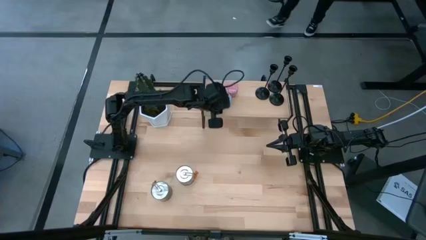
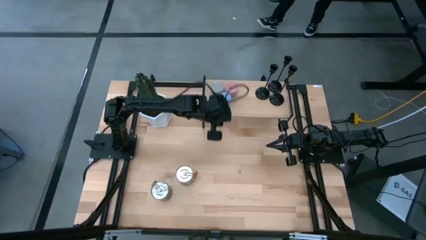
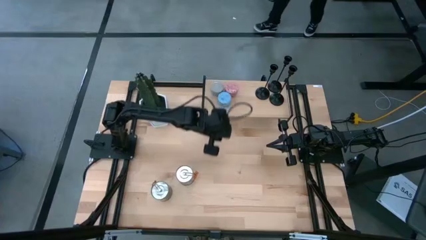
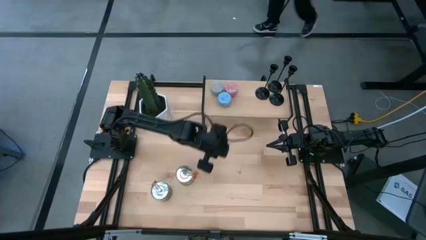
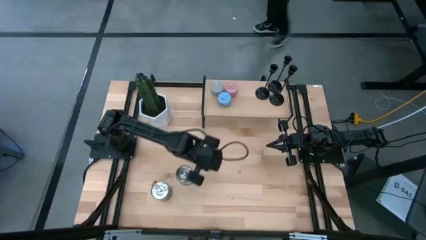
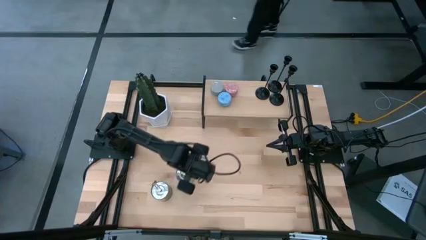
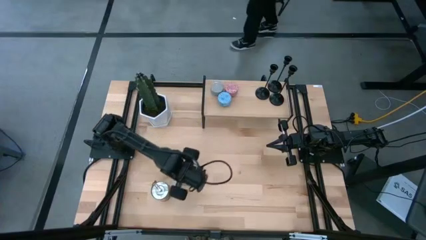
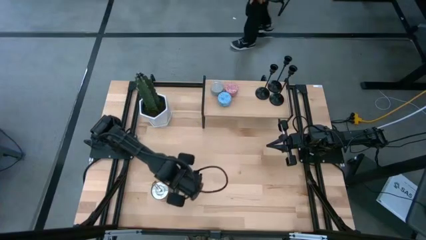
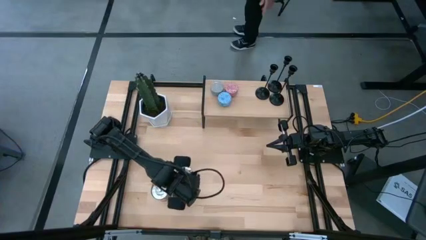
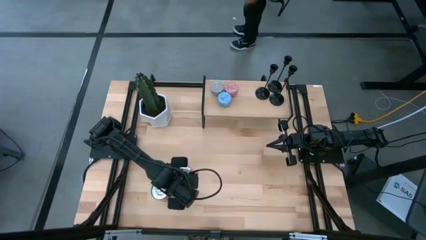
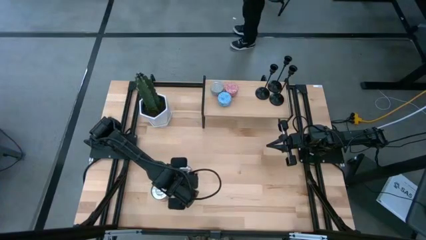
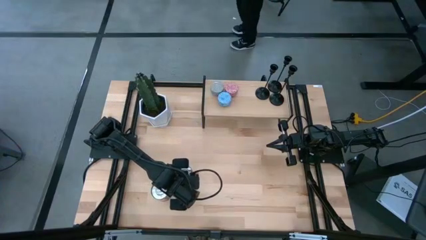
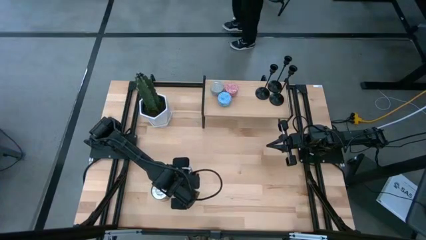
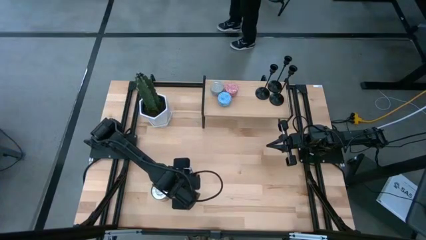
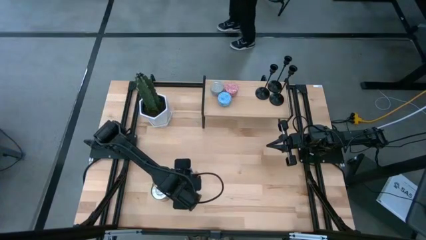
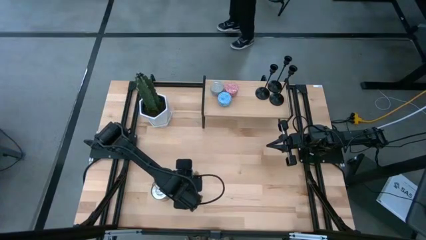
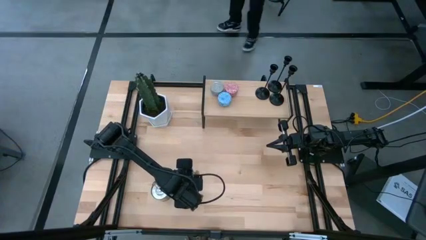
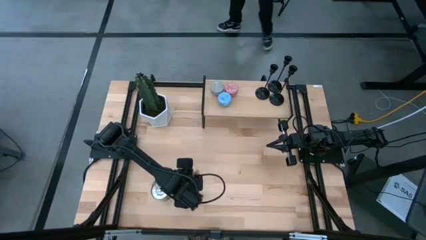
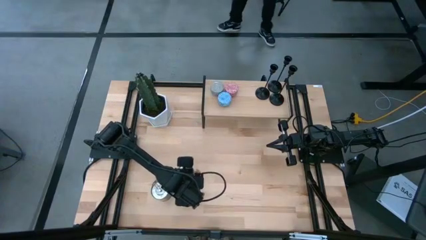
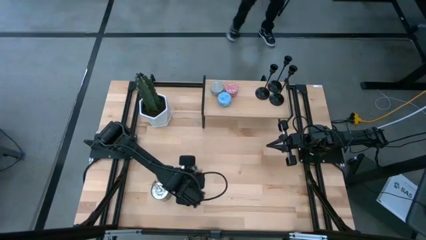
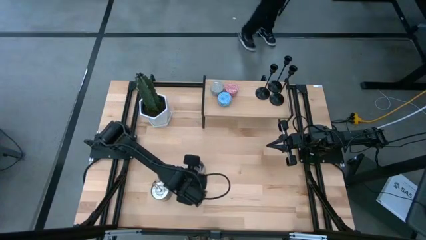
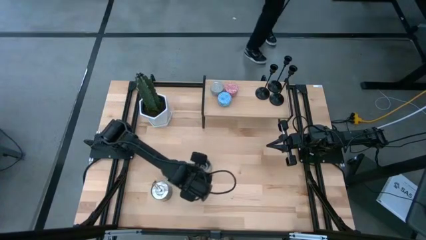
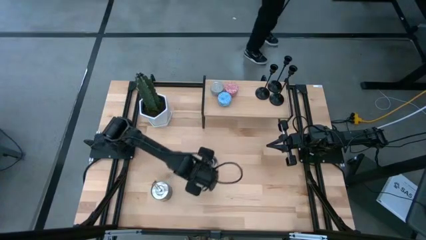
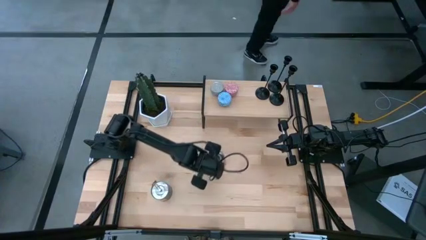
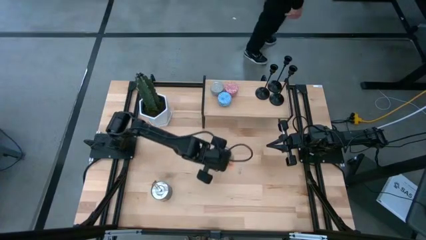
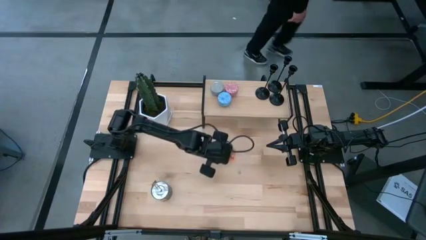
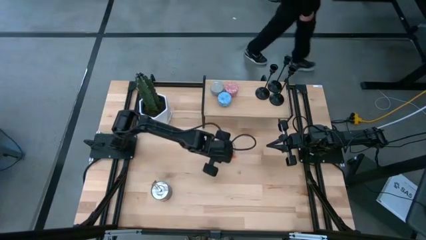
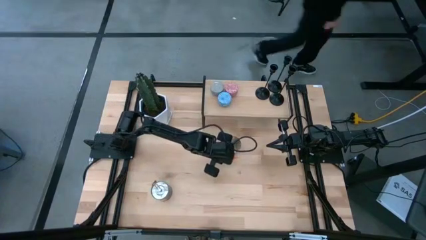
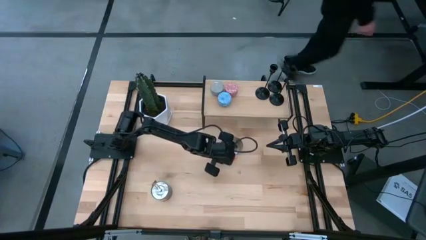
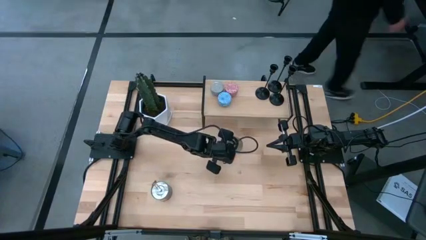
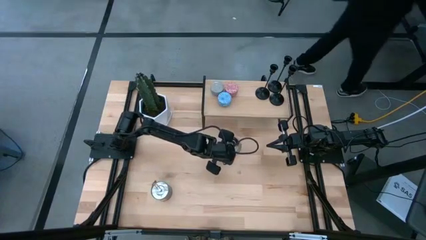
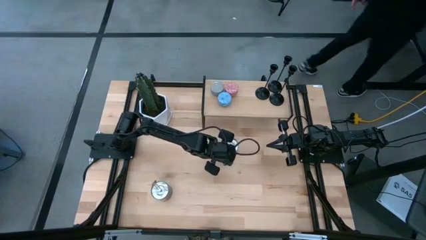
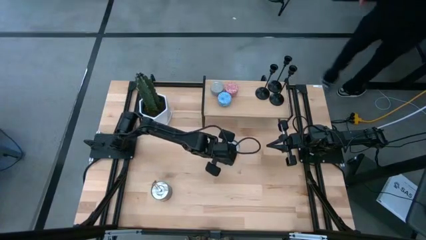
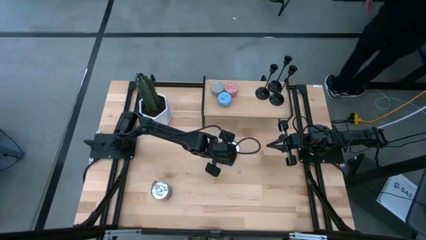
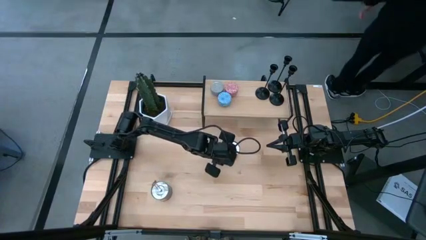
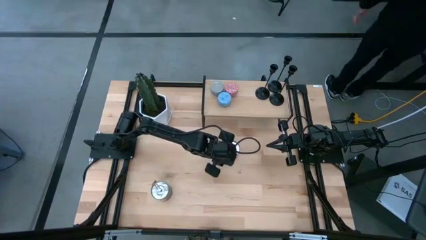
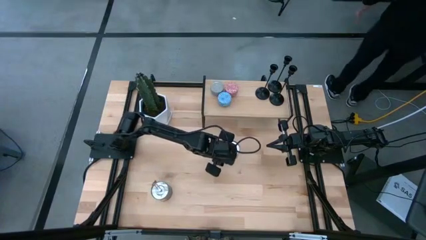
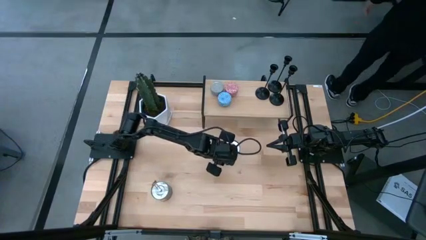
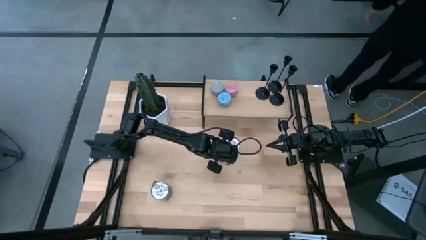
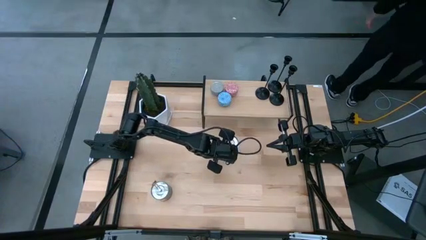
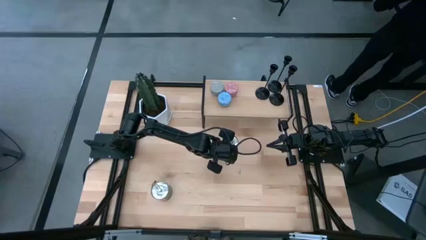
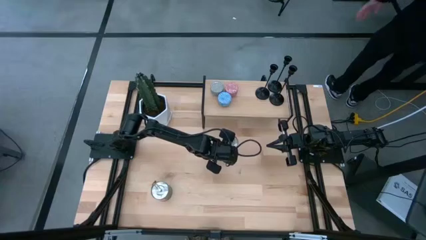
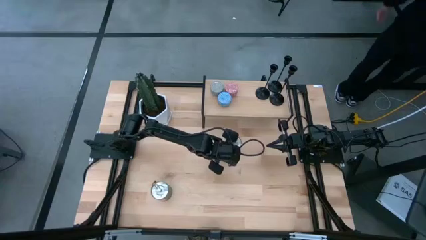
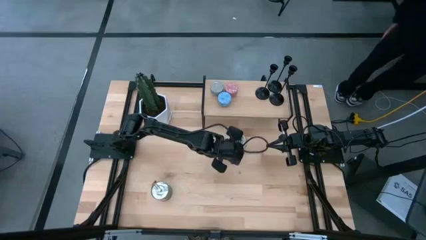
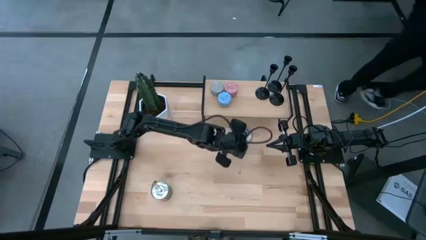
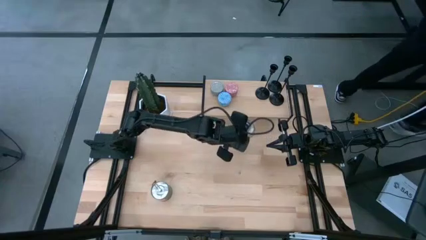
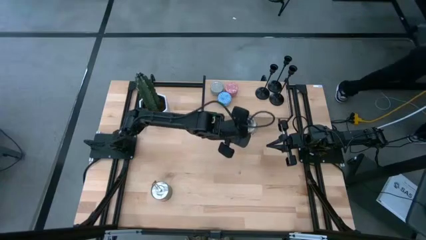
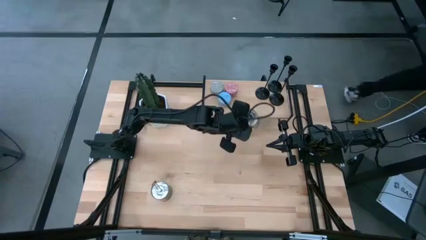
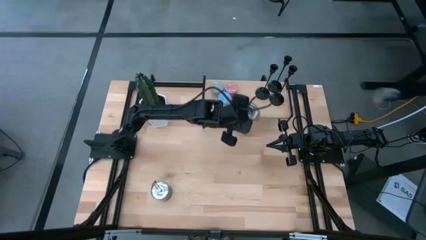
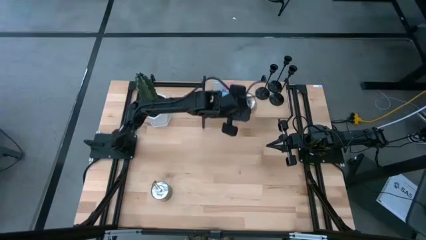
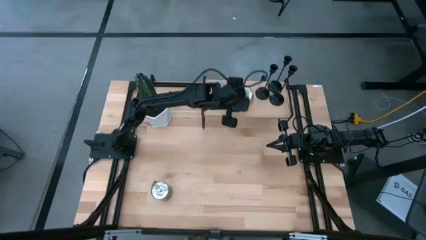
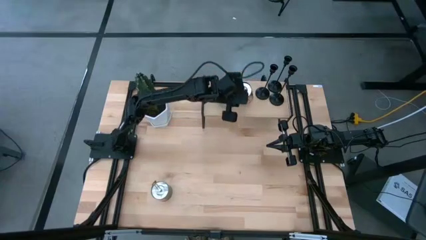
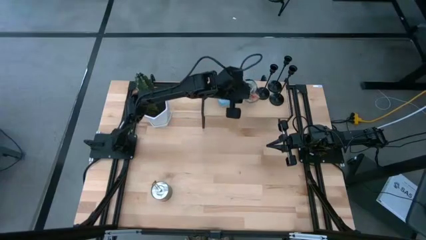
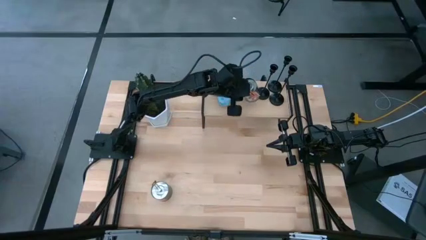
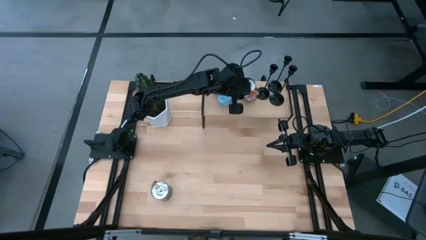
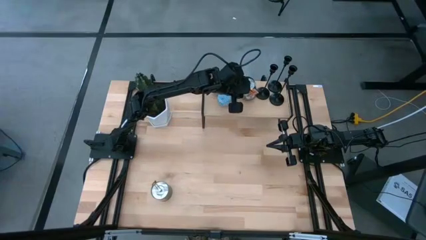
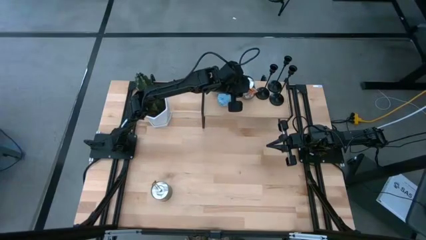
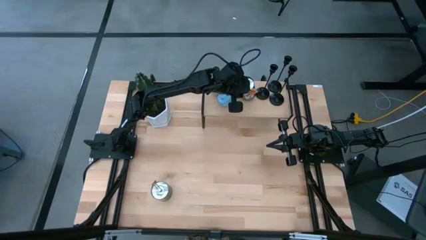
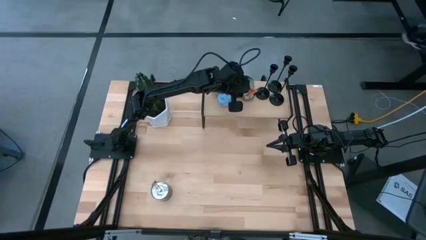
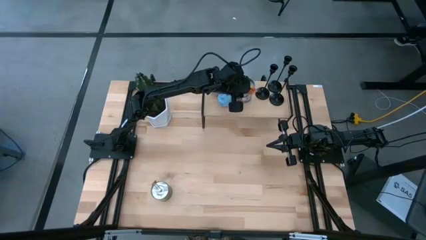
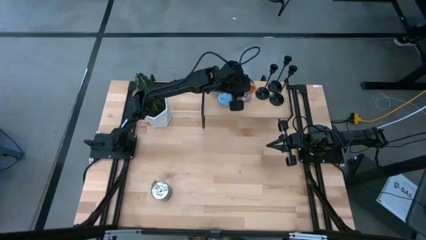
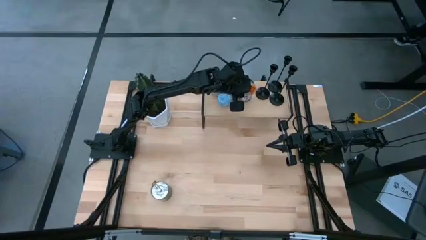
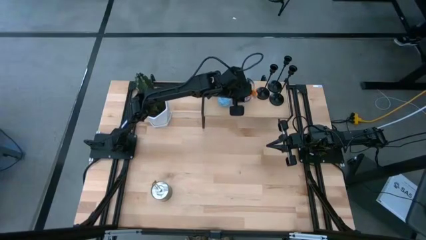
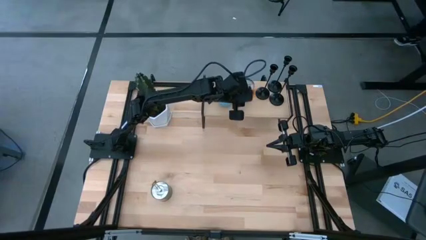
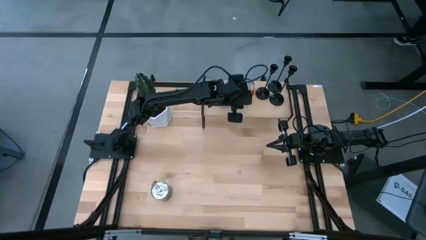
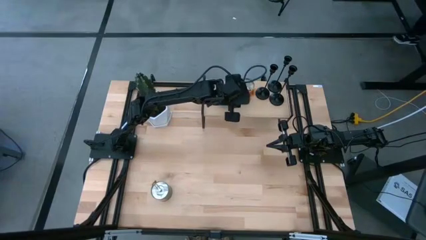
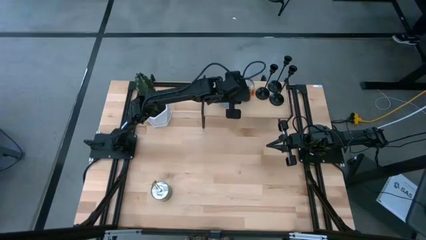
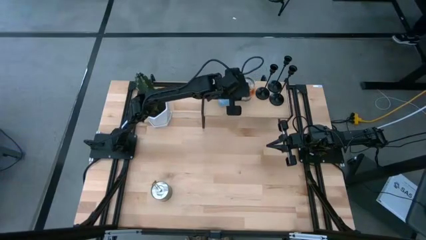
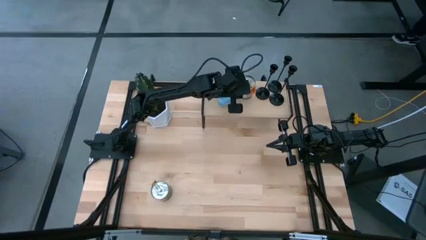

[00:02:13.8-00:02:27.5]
Task: Pick & Place candle stick holders
Put the right orange scented candle on the shelf

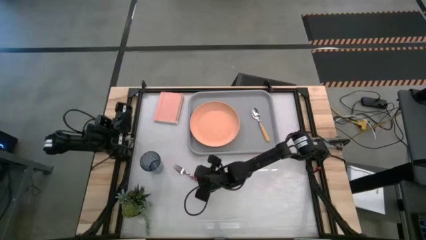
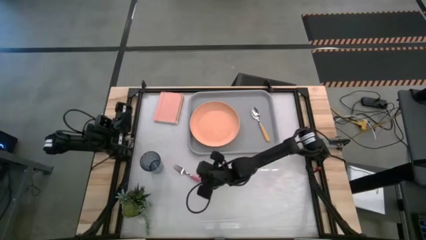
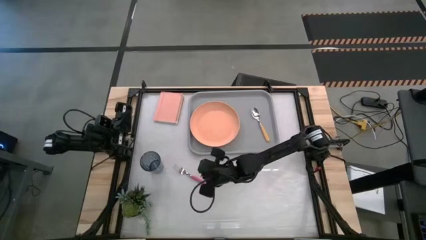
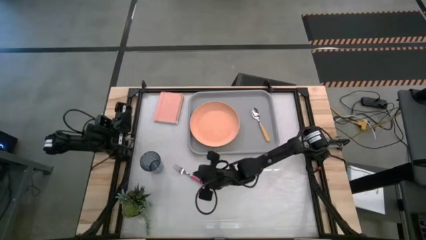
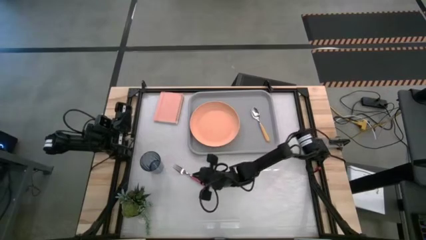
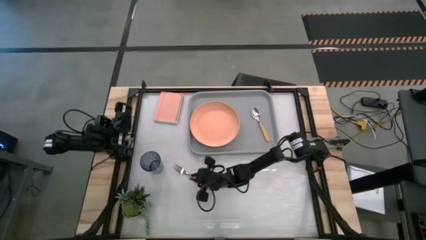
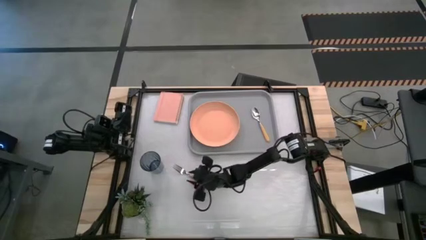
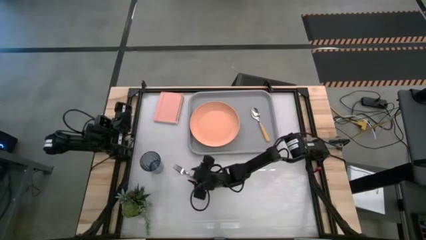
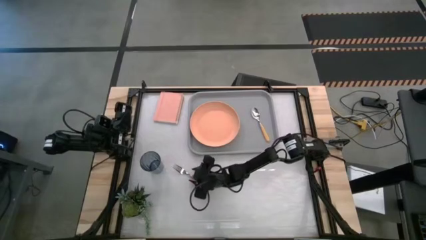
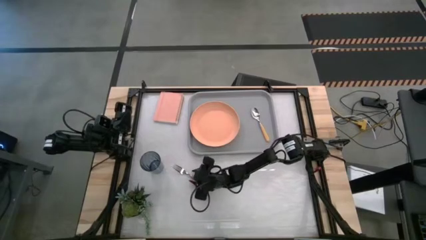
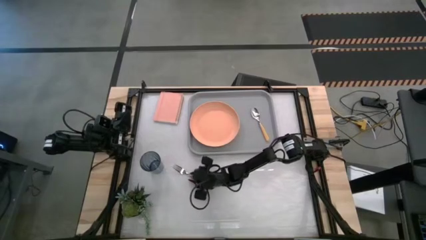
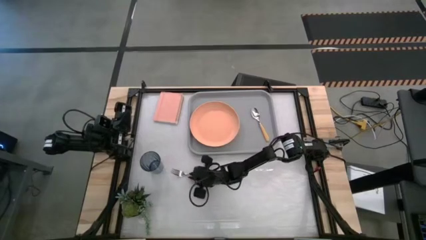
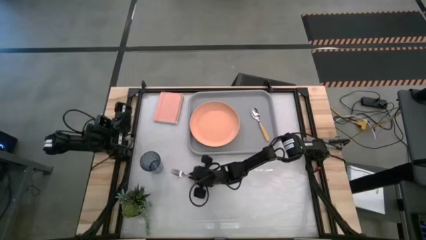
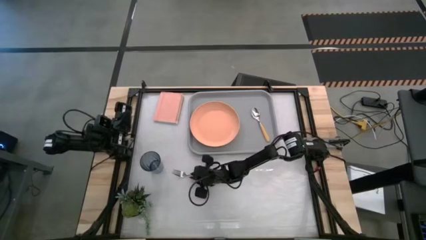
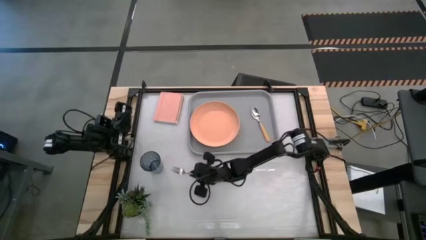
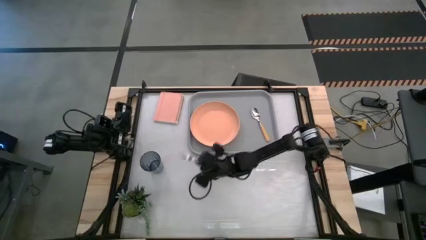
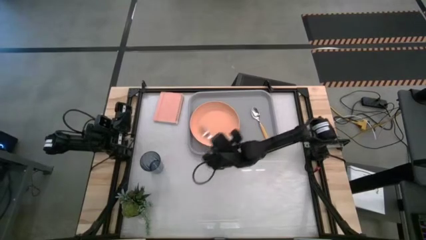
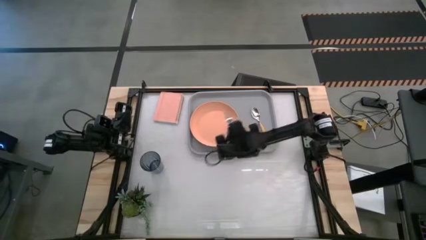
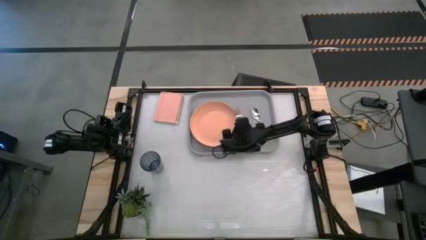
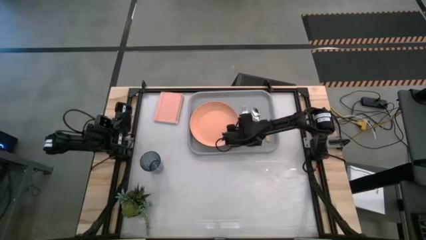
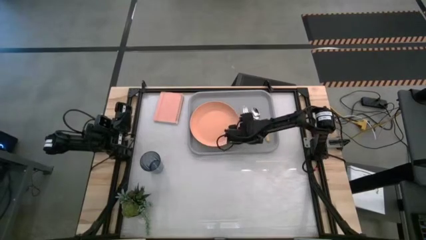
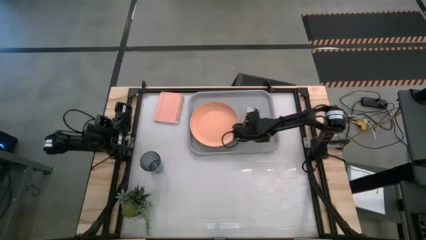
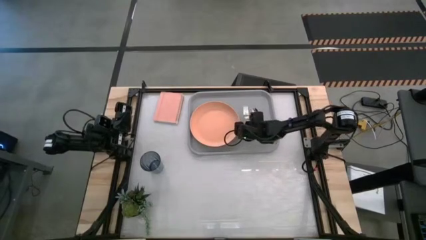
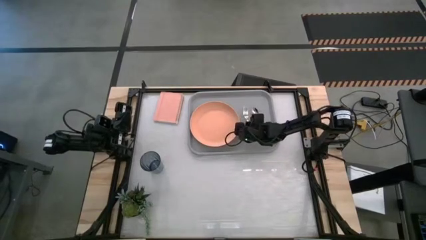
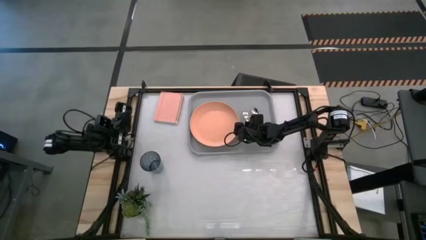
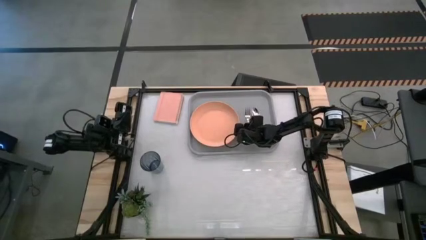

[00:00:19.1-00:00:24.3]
Task: Pick and place plate/cup/fork/spoon on tray
Put the pink fork on the gray tray to the right of the orange plate
